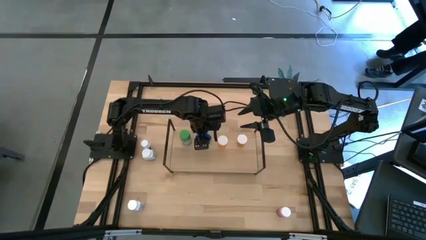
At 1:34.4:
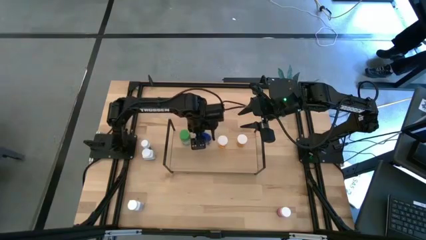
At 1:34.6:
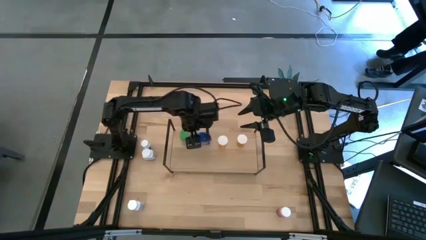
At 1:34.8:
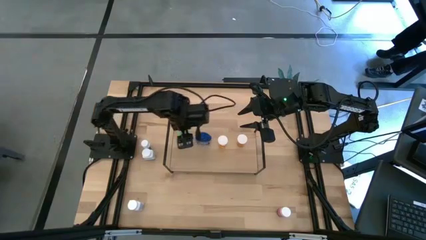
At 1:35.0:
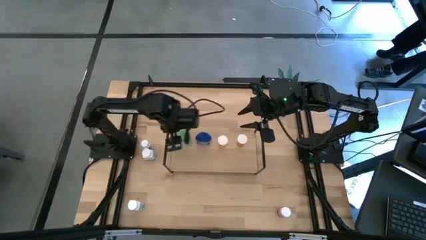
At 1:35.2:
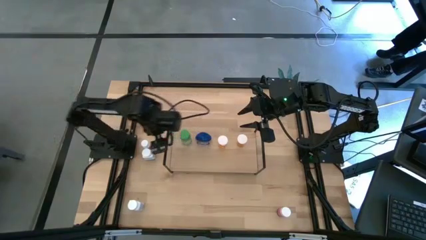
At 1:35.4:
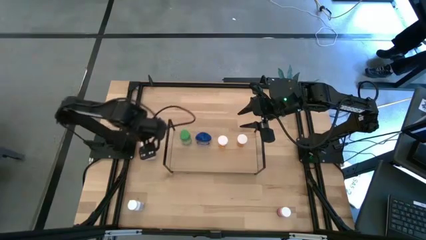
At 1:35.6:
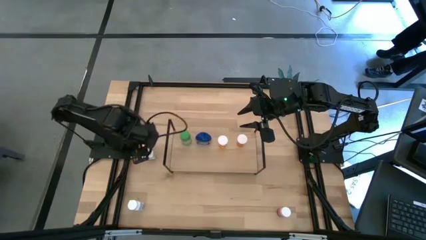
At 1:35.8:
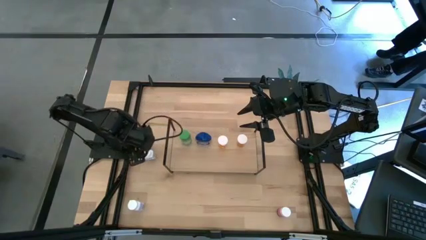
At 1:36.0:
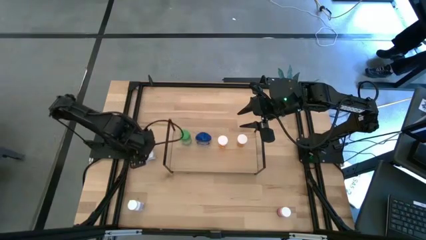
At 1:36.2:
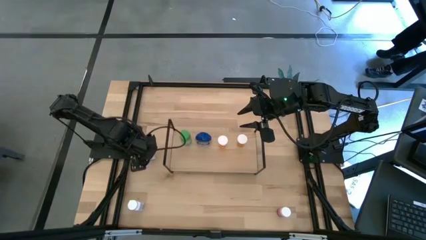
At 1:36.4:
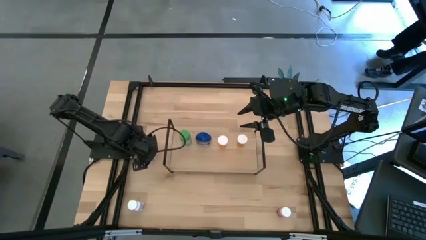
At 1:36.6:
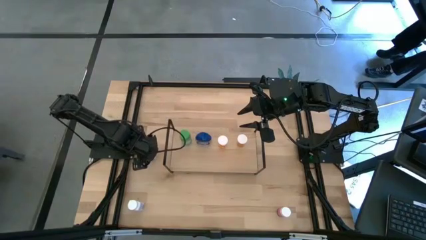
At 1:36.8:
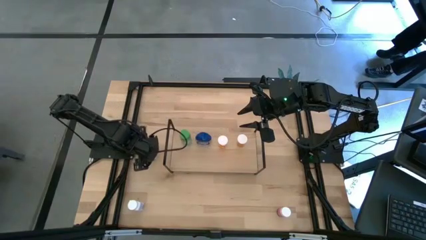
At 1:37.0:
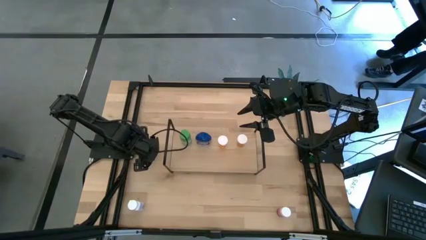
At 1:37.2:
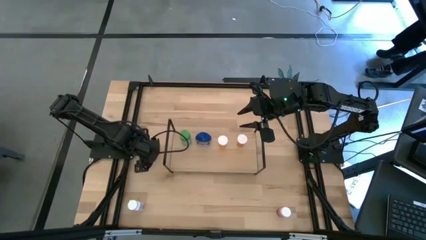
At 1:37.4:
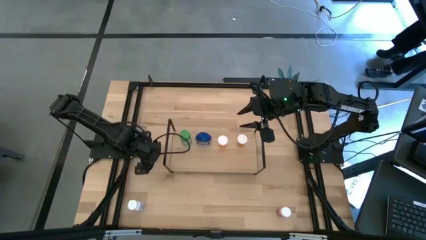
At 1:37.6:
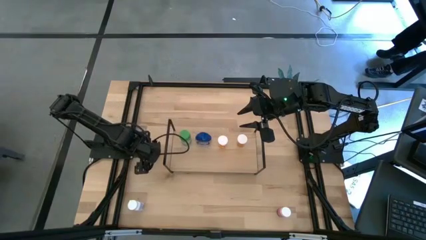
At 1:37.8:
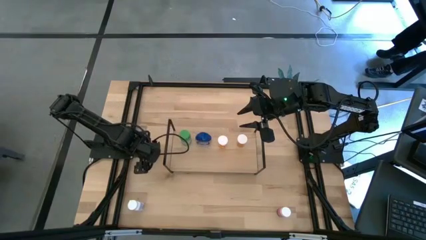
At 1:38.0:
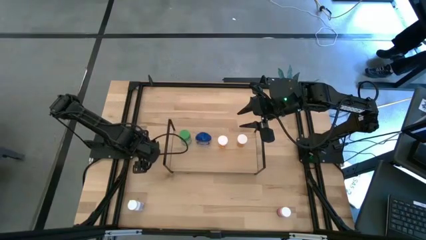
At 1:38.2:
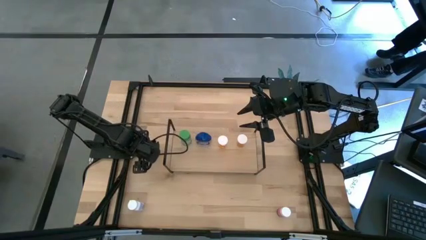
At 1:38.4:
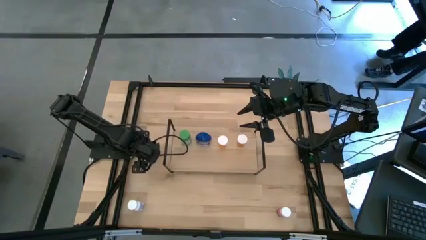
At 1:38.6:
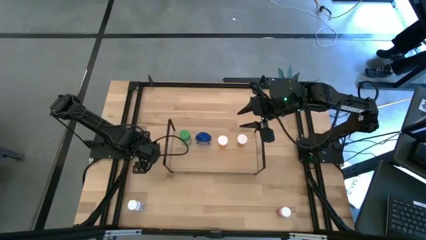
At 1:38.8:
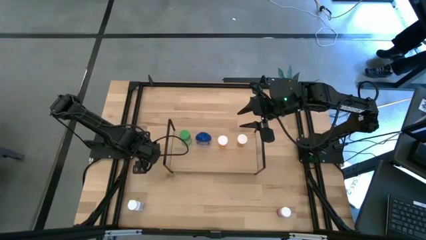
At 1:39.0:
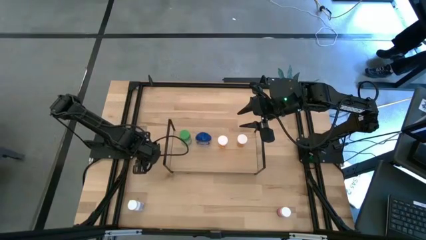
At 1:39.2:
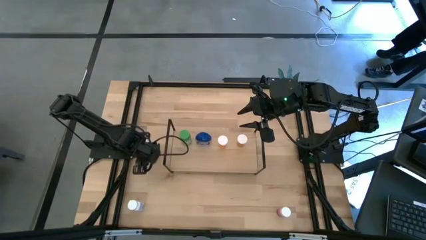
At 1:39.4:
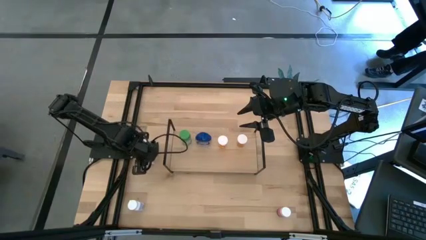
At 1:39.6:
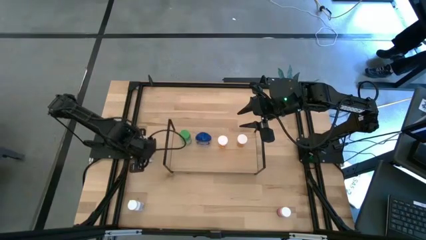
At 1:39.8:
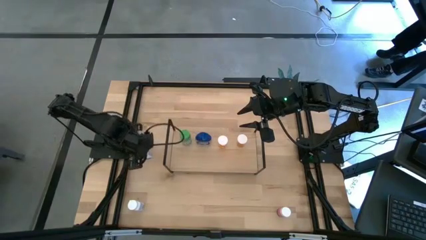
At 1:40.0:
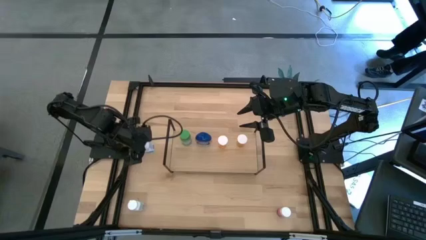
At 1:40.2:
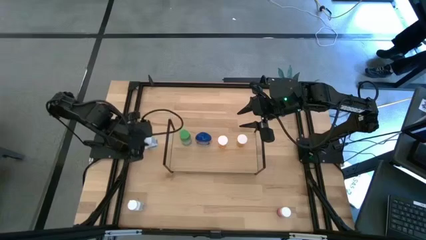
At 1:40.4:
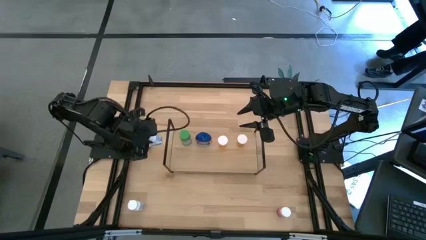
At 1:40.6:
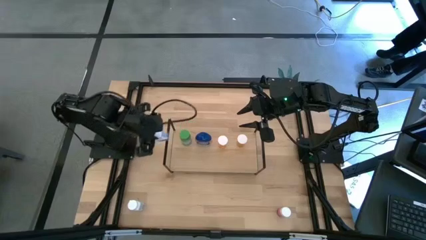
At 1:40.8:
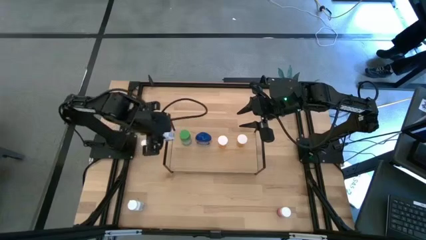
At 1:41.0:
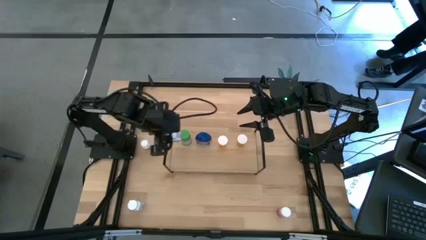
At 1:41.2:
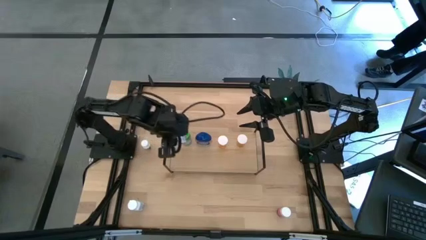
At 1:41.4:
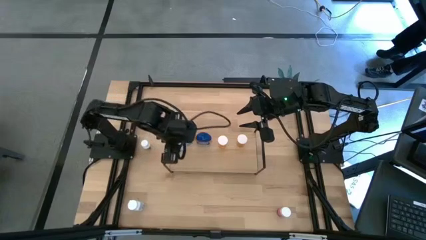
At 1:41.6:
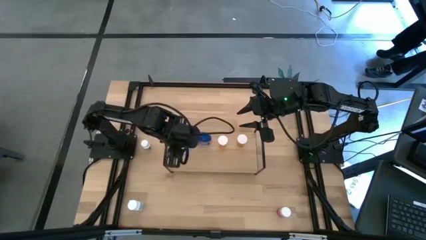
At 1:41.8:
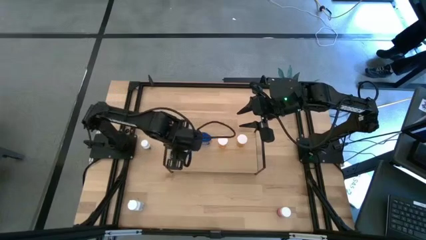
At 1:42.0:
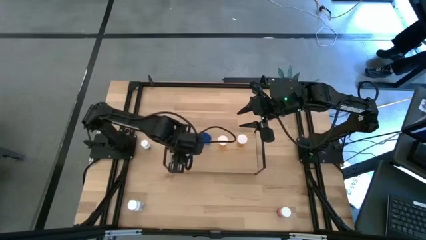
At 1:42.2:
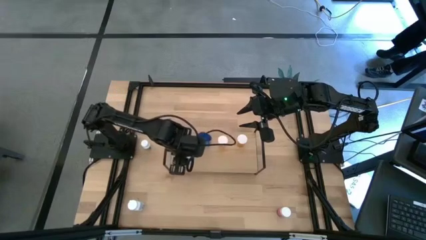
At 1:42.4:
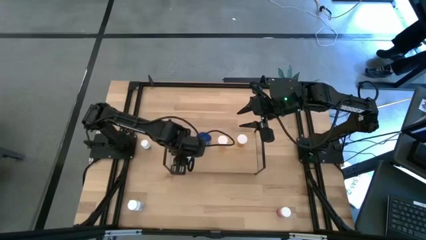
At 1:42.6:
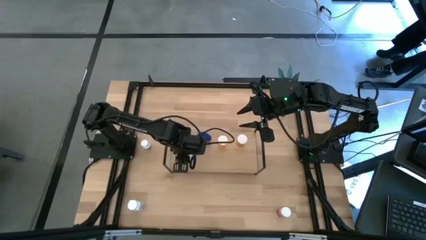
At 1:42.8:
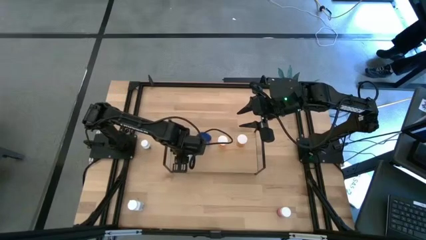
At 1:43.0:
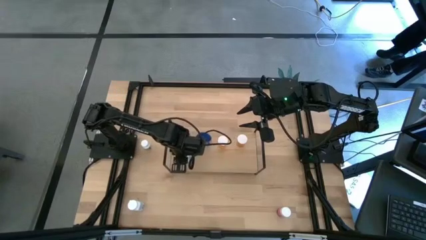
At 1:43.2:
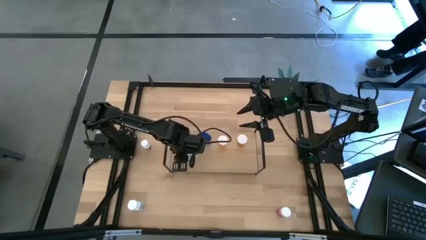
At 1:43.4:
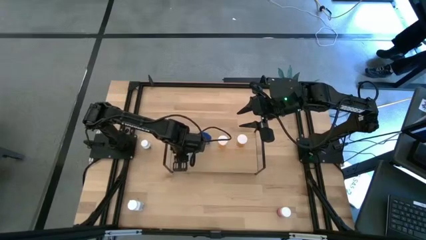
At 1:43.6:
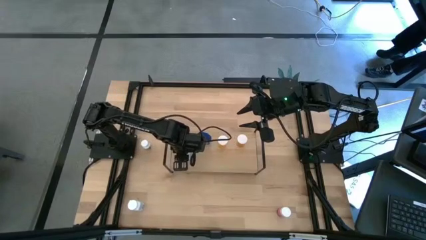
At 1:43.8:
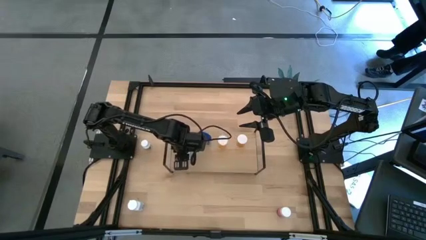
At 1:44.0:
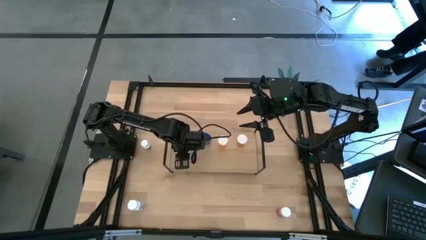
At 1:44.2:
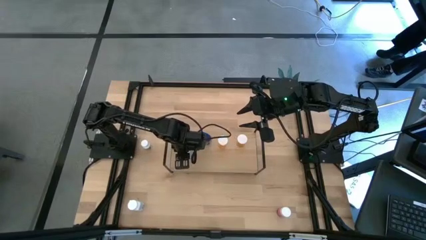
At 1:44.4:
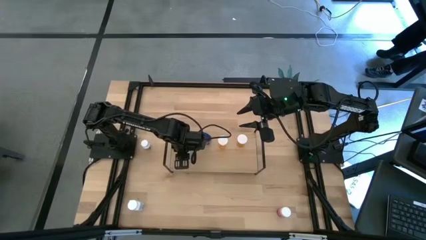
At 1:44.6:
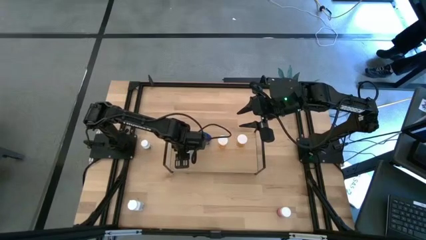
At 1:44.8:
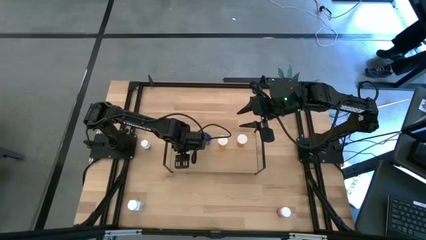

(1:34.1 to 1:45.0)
Task: Pick and place medicine bottles onto shelf by color
Put the top big white pill bottle on the shelf

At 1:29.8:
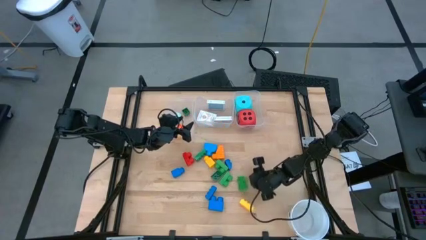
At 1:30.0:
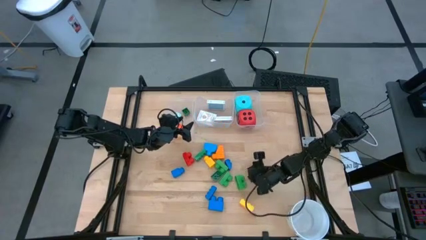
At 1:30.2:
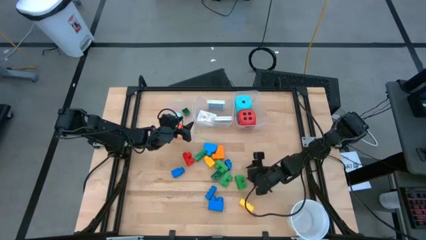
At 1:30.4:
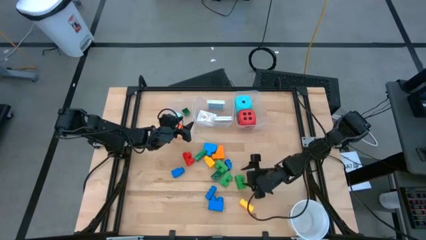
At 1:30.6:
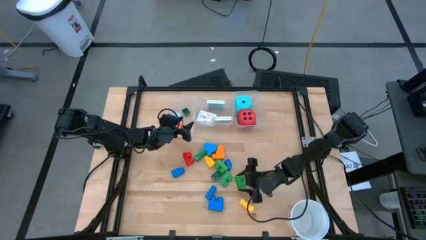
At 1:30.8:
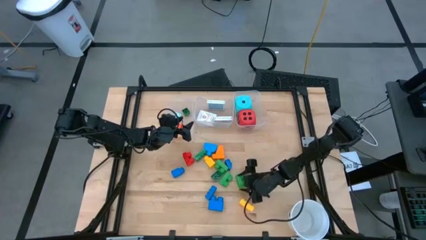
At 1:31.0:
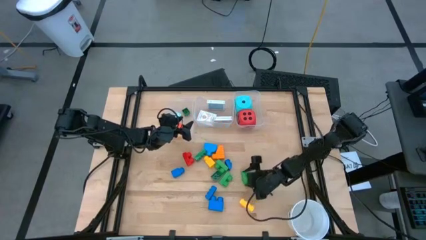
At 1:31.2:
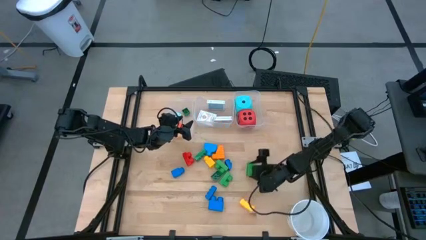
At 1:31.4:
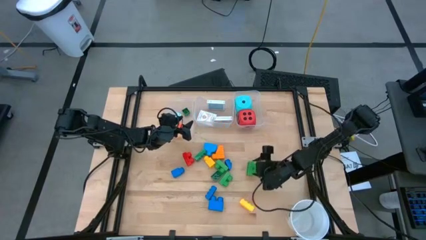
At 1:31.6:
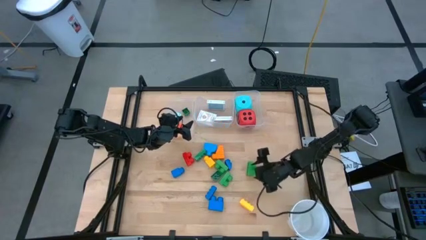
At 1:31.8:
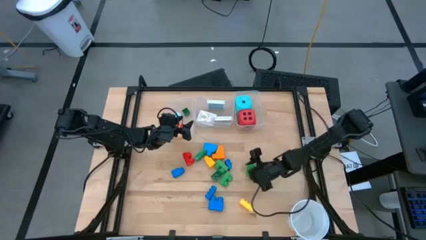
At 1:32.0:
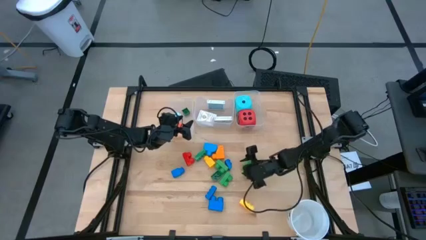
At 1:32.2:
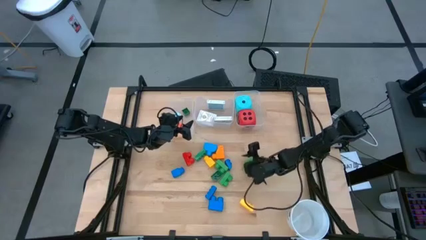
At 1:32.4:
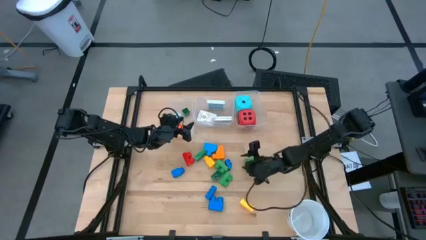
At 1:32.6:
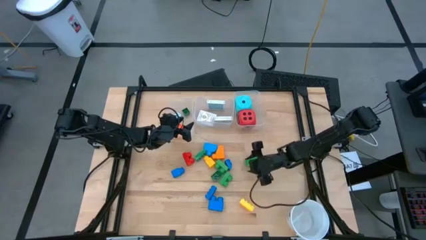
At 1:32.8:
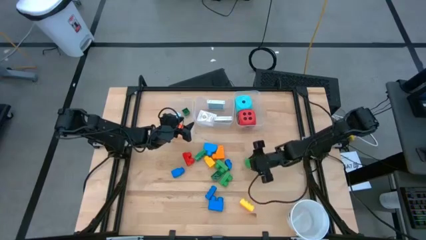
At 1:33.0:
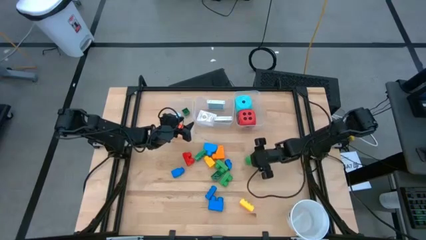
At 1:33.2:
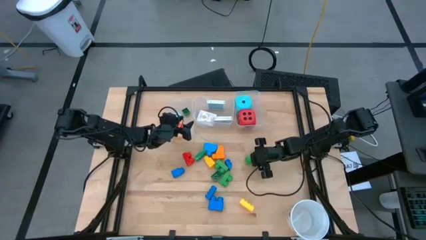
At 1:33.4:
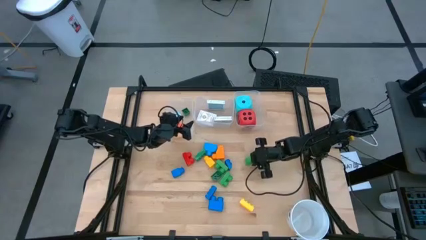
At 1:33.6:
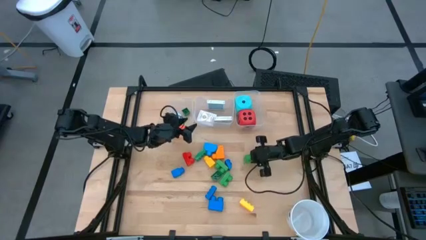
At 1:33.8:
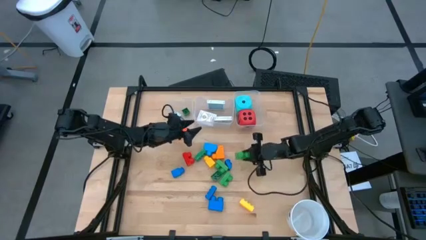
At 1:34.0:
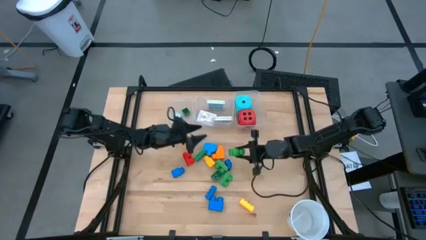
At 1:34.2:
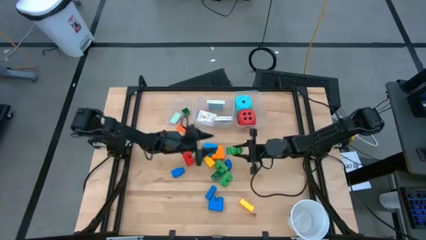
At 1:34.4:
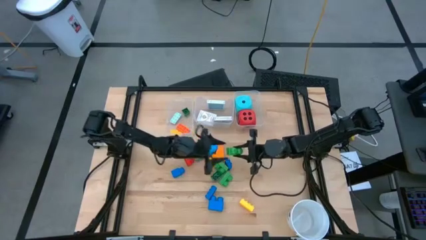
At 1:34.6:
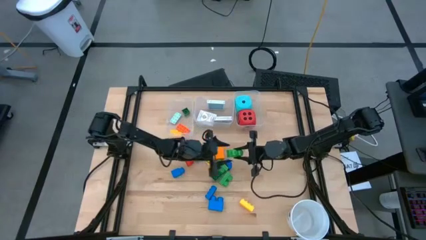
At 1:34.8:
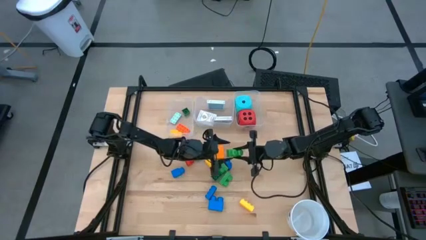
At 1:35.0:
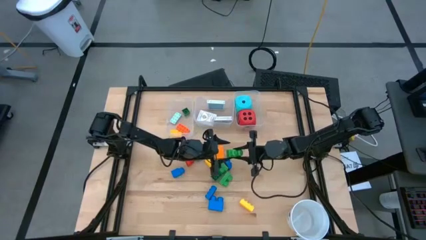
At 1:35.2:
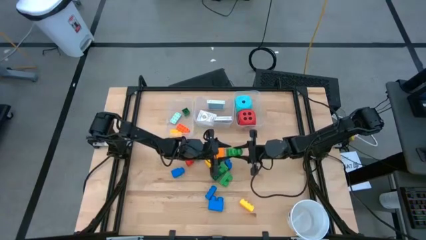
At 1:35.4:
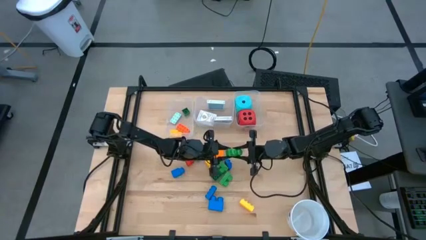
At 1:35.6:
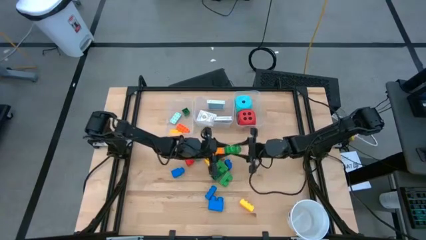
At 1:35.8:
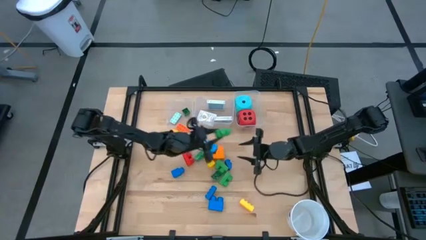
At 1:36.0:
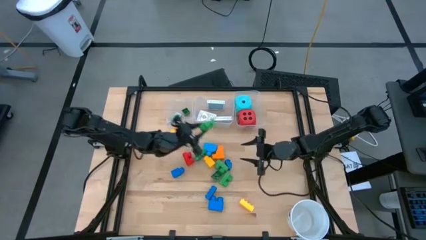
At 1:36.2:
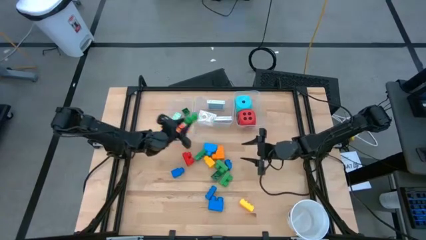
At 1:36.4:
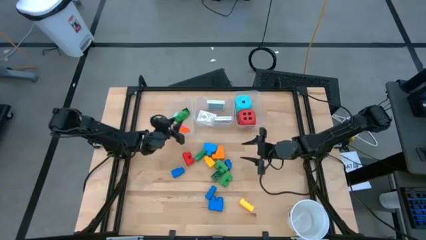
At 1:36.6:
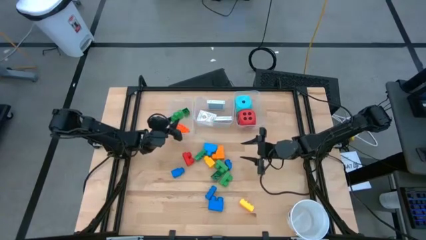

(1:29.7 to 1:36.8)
Task: Pick & Place Toys
Put the green game piece into the left transparent bin
